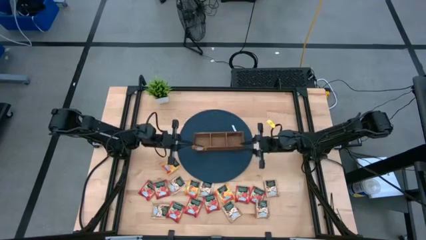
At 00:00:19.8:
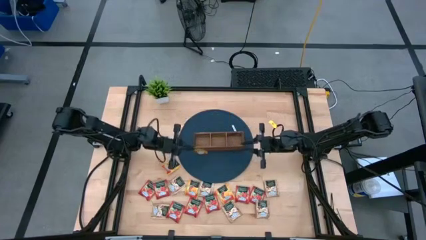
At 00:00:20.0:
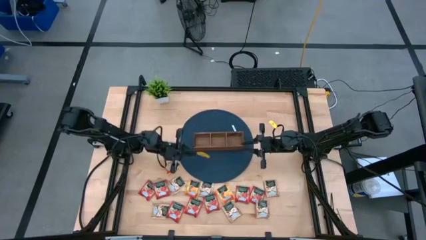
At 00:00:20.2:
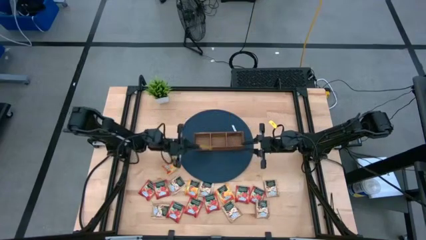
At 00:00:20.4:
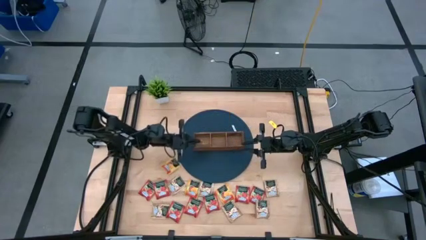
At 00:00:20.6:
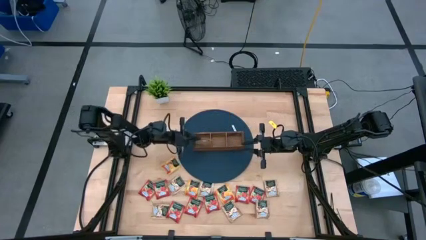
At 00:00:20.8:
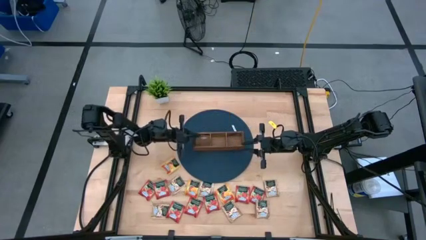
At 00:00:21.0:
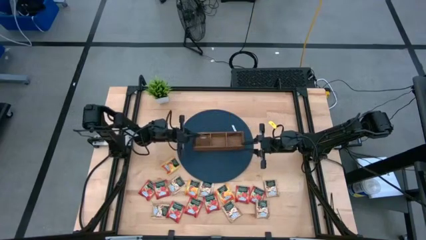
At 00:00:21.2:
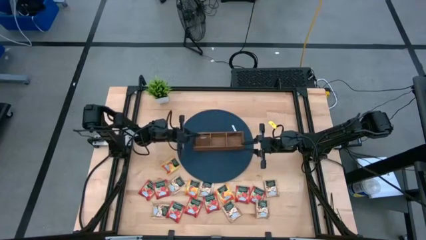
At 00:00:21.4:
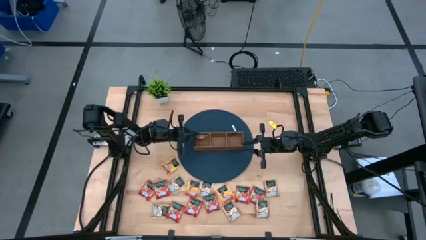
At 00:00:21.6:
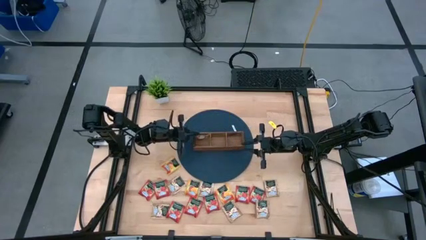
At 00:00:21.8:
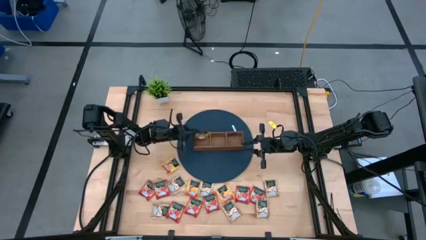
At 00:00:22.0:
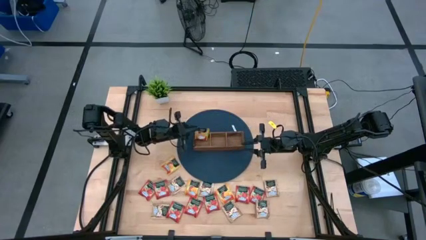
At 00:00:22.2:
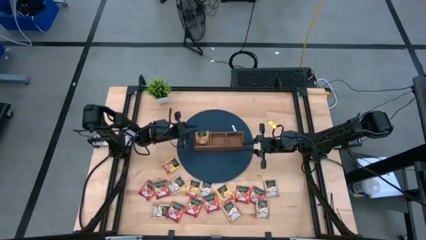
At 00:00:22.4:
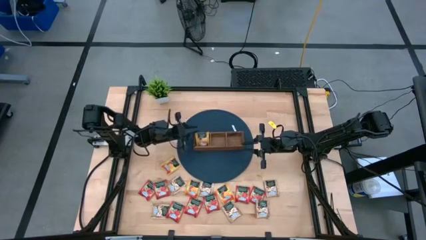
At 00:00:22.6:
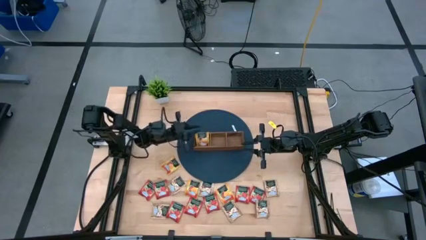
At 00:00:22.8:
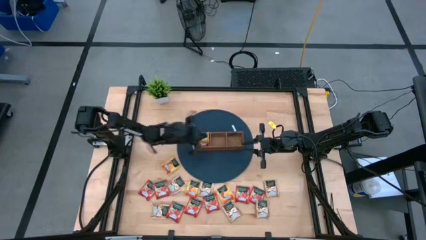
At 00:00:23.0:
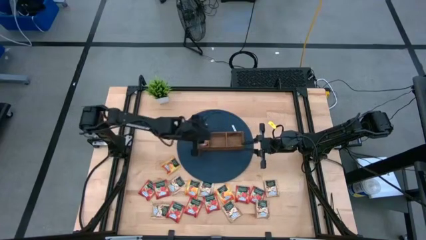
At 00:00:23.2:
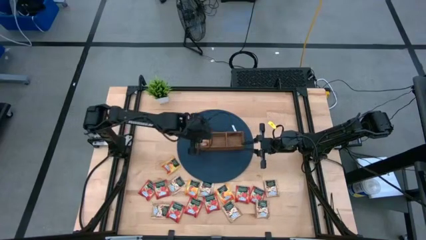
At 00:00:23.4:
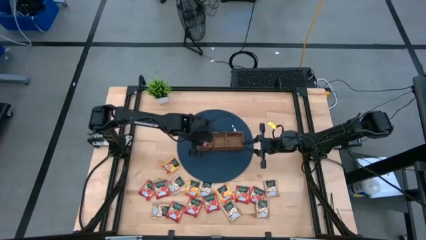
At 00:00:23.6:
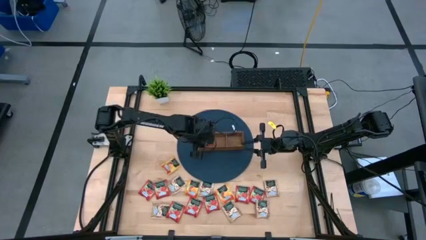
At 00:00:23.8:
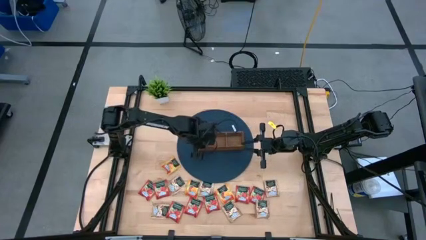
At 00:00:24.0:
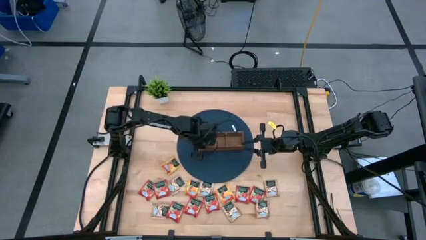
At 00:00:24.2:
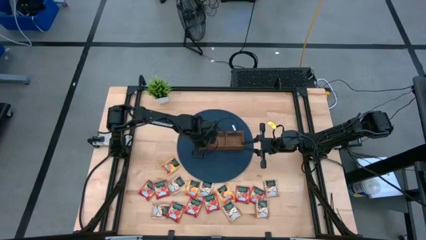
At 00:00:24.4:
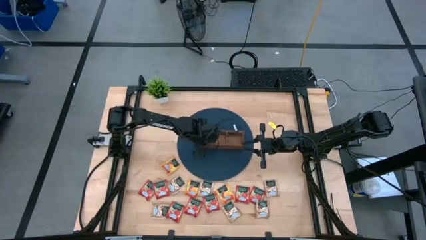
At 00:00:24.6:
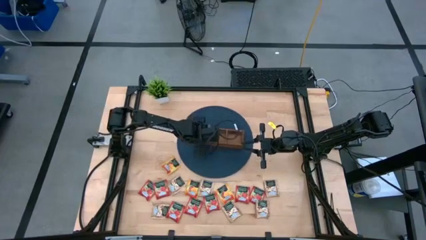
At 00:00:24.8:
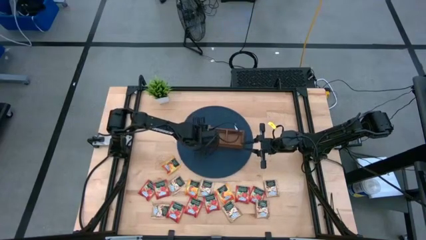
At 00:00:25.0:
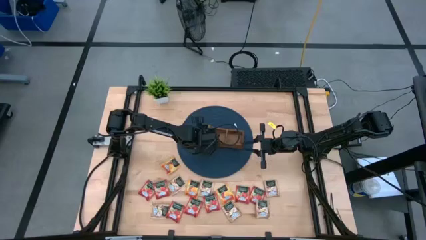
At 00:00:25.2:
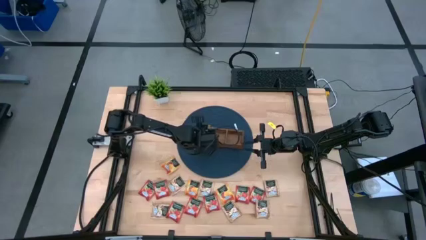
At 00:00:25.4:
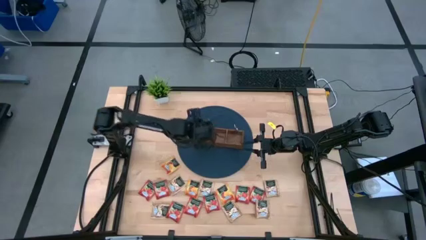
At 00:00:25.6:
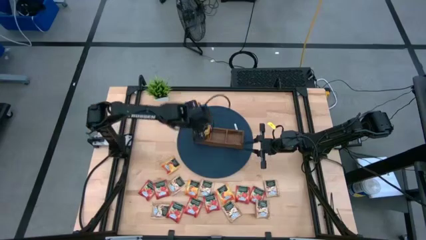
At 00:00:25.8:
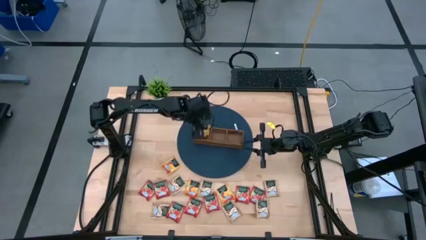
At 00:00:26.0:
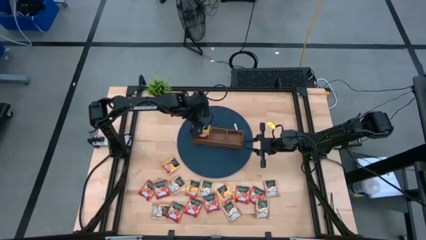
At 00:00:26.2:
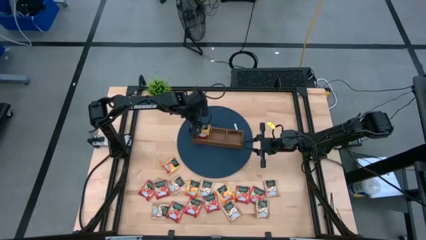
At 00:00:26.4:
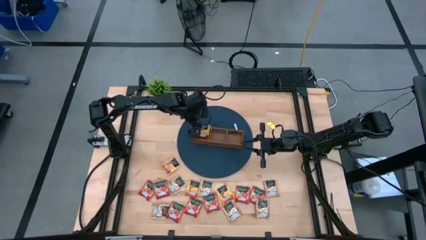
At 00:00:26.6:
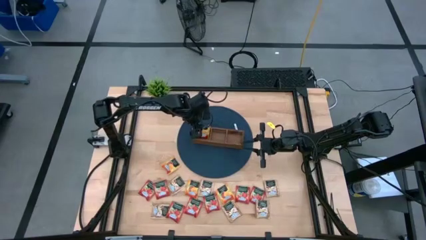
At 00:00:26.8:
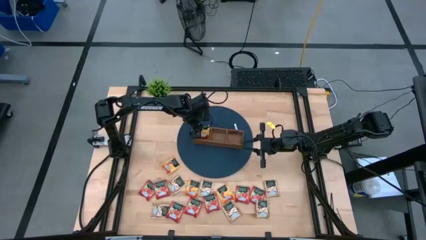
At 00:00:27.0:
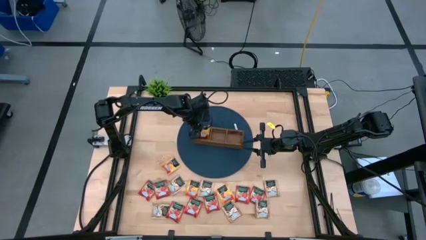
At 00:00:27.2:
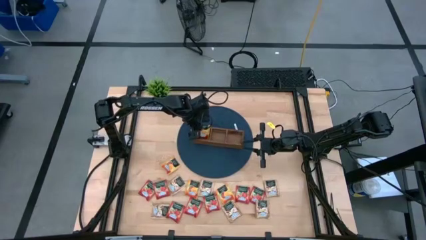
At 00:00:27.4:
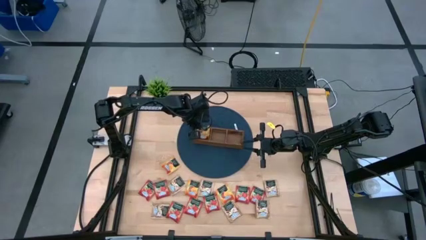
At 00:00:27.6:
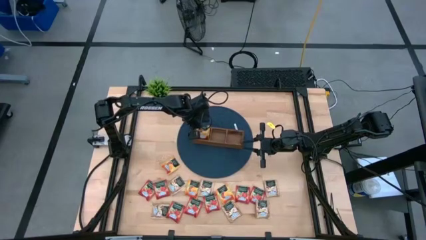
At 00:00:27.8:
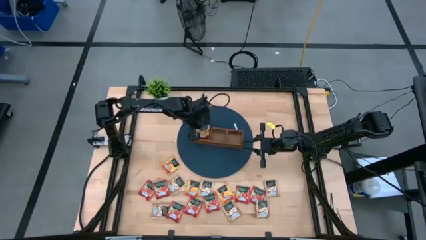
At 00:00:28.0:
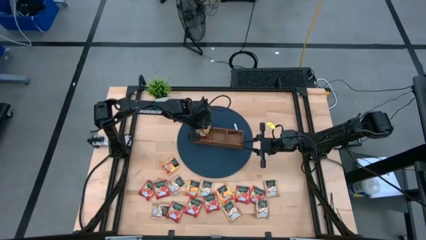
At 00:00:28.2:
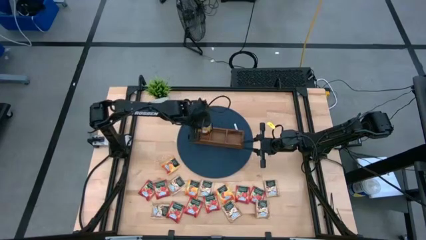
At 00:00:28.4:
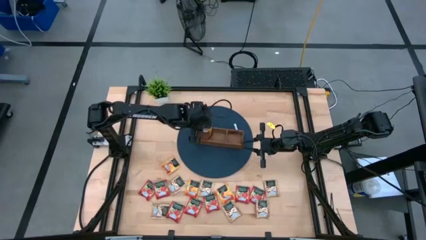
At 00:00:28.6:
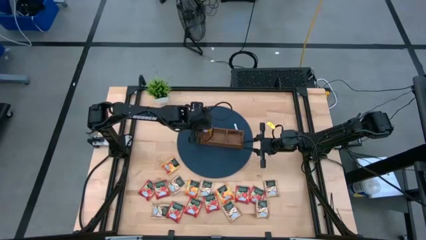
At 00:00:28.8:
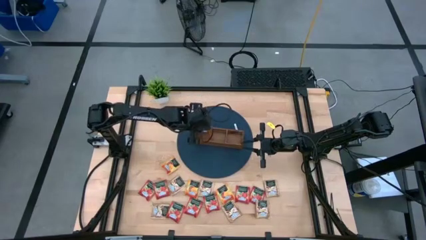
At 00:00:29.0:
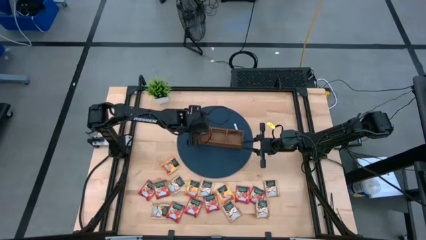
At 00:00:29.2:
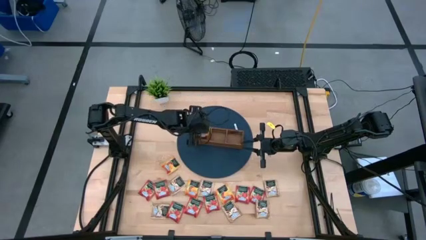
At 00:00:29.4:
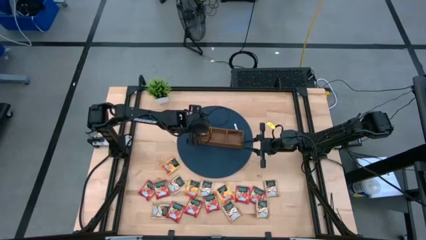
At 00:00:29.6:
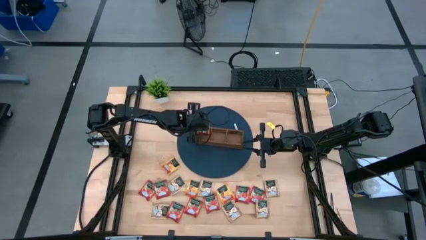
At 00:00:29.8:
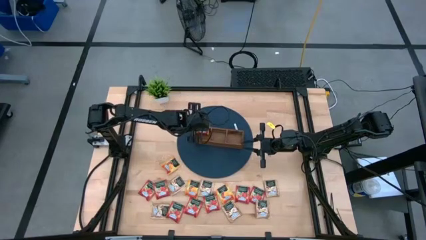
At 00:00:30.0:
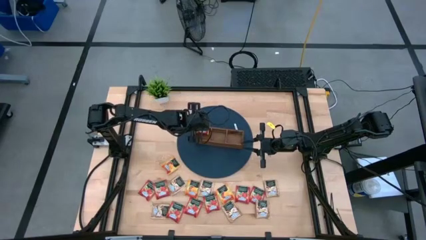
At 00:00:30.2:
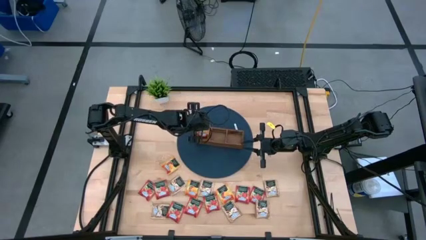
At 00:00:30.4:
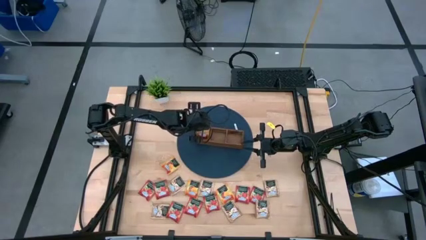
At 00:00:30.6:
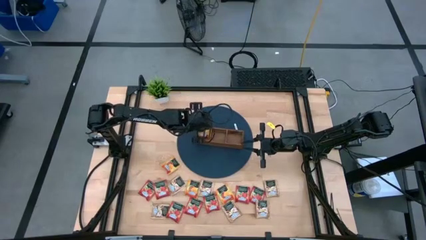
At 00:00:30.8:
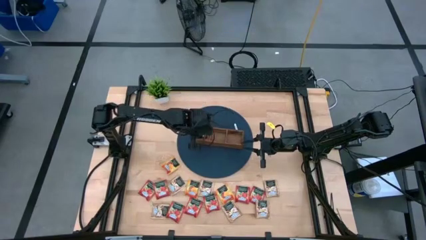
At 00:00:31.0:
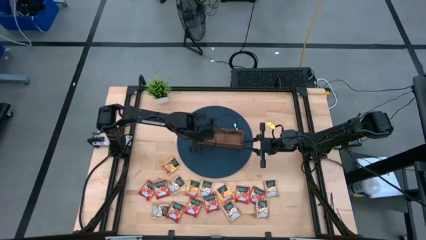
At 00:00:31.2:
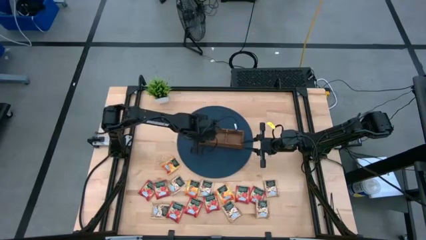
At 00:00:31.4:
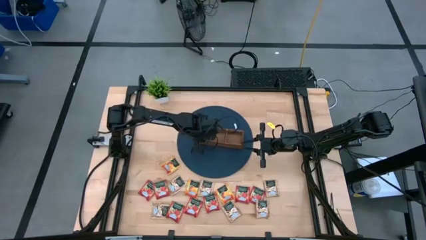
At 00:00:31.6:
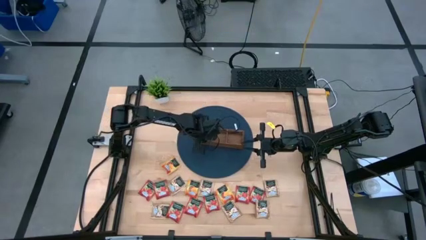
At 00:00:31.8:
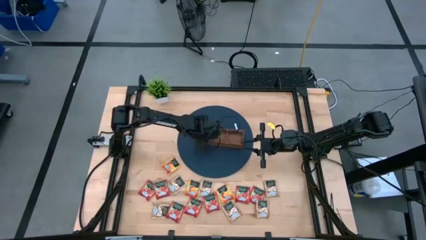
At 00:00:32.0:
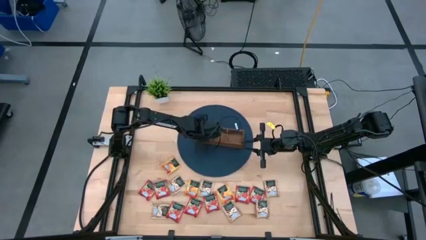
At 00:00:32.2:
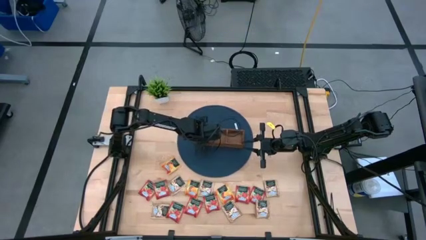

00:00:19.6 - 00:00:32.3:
Task: Pick & Place Tea
Put the yellow tea bag into the left section of the wooden organizer
